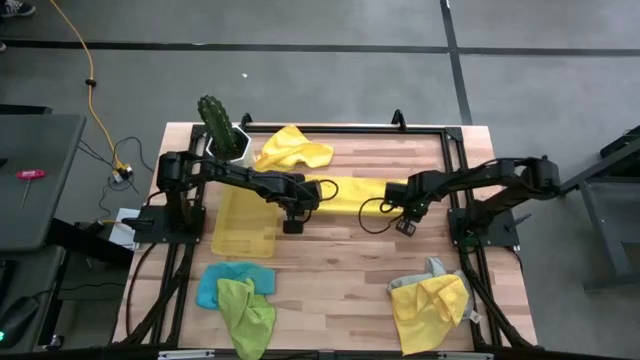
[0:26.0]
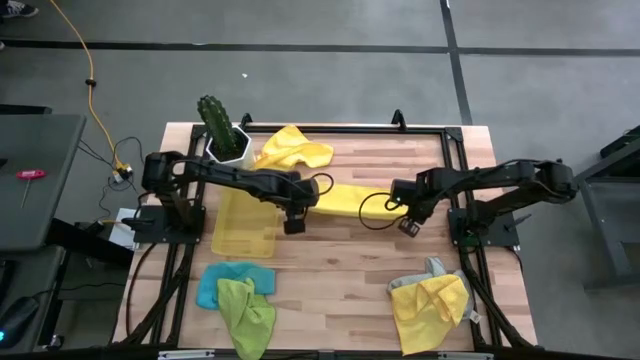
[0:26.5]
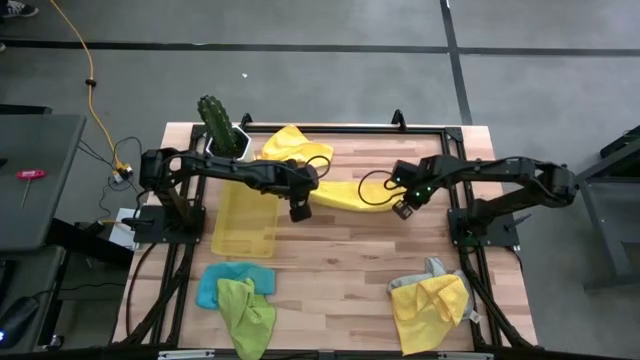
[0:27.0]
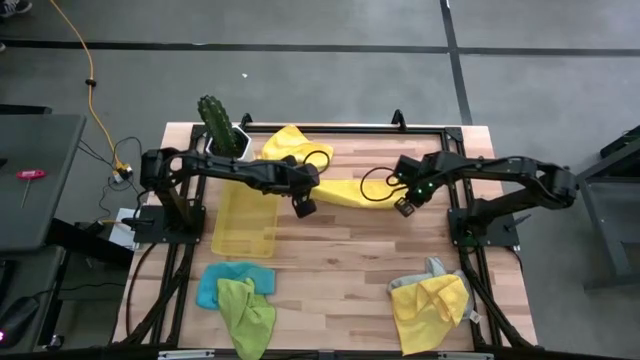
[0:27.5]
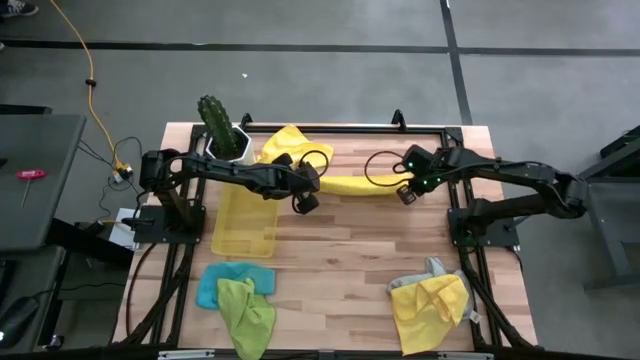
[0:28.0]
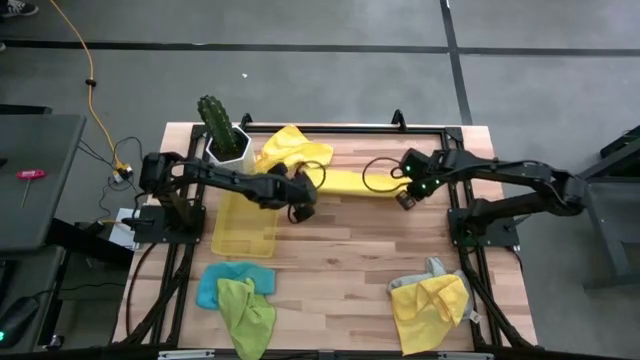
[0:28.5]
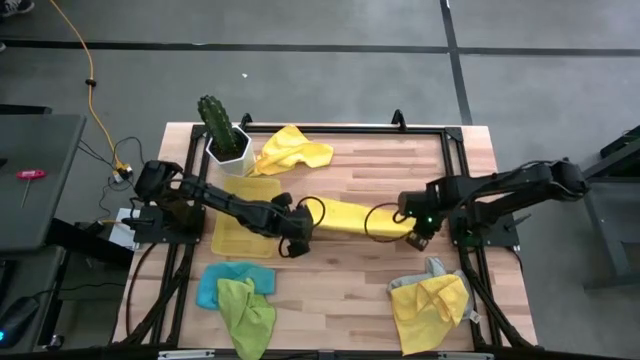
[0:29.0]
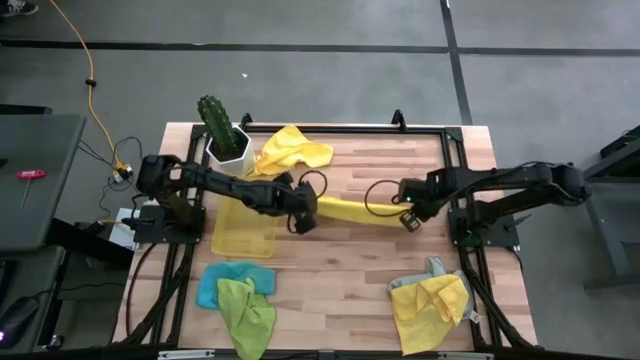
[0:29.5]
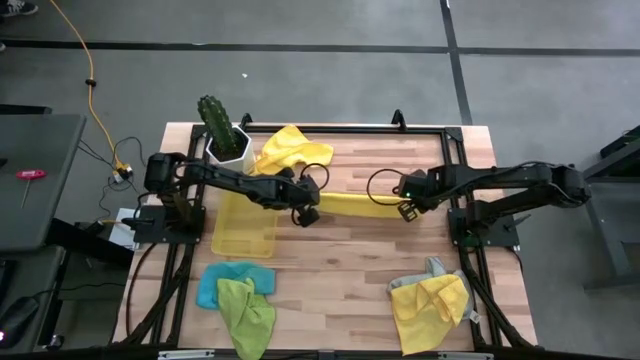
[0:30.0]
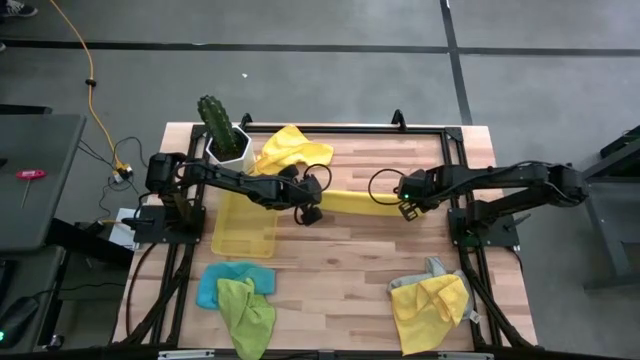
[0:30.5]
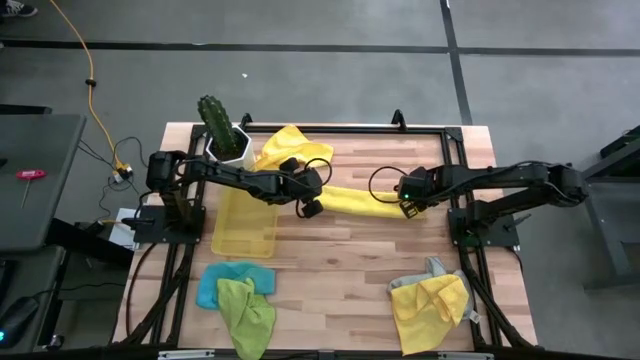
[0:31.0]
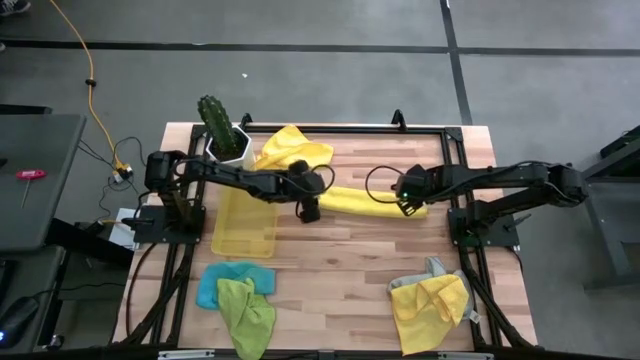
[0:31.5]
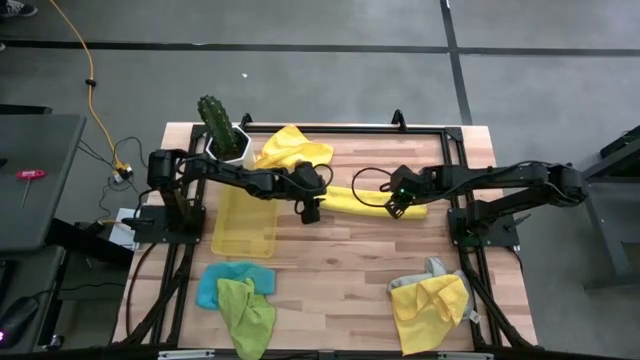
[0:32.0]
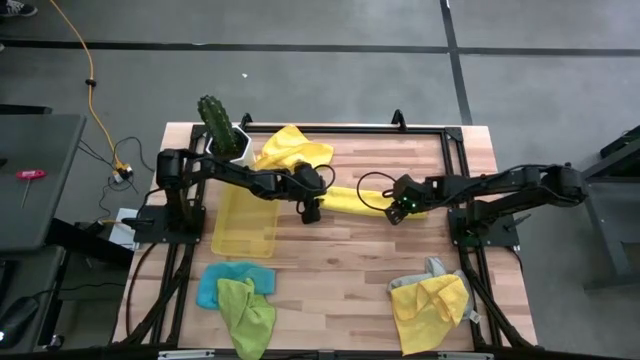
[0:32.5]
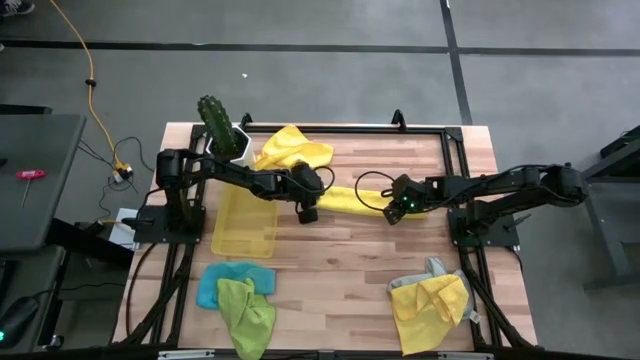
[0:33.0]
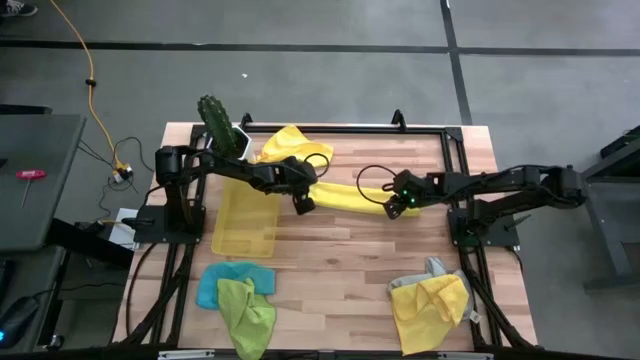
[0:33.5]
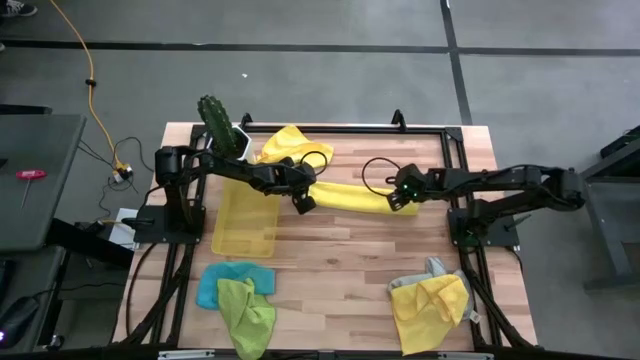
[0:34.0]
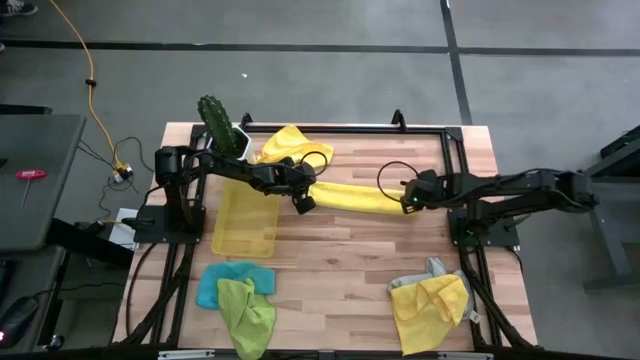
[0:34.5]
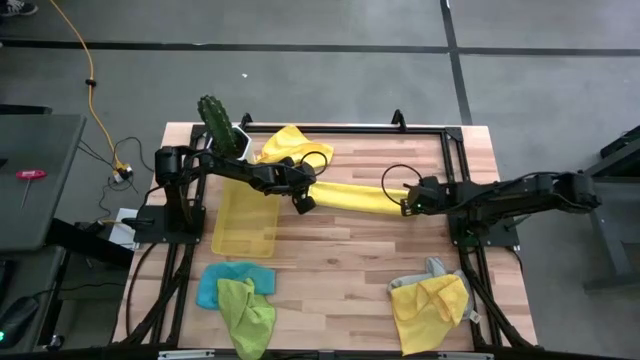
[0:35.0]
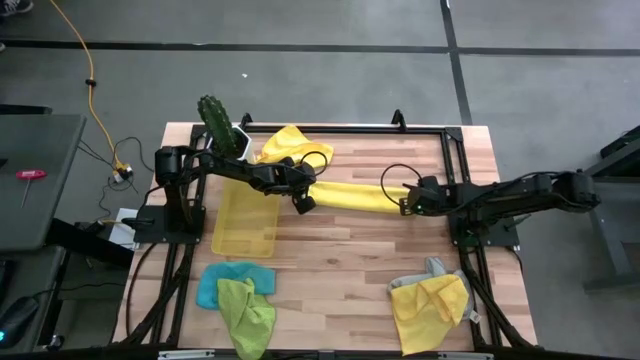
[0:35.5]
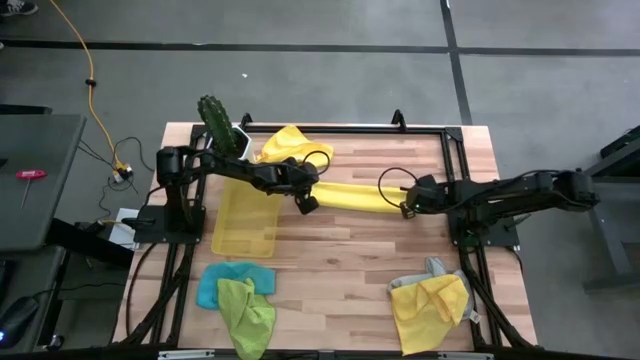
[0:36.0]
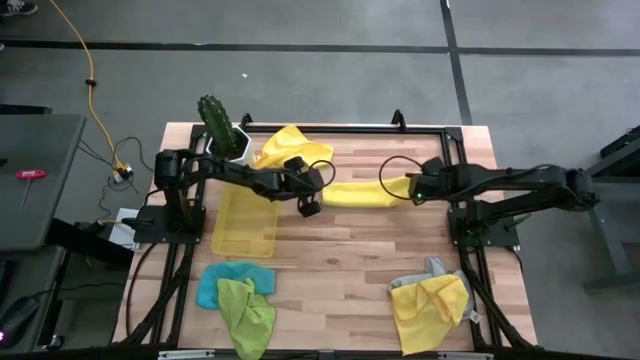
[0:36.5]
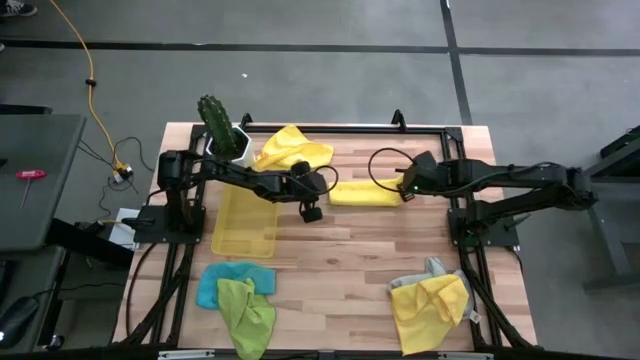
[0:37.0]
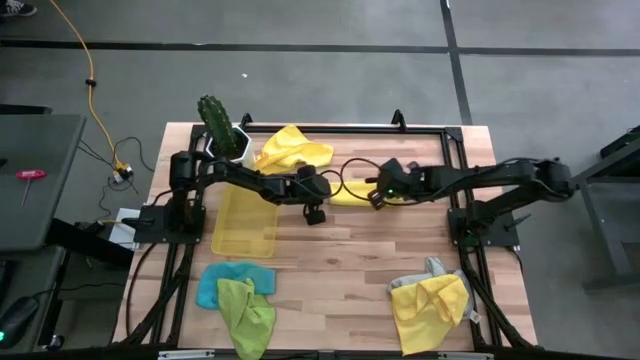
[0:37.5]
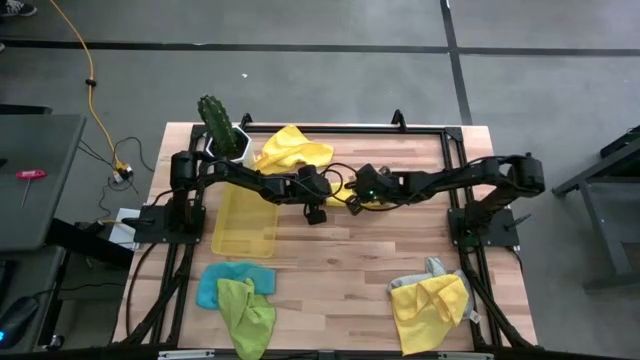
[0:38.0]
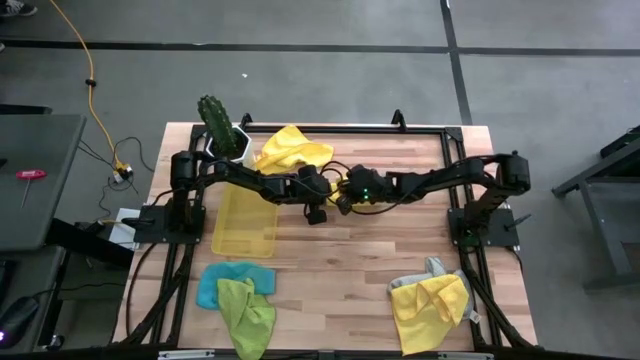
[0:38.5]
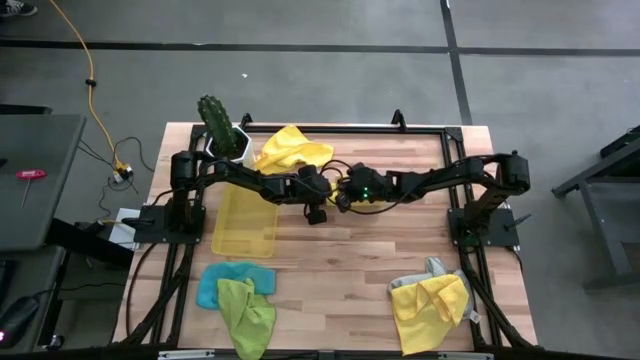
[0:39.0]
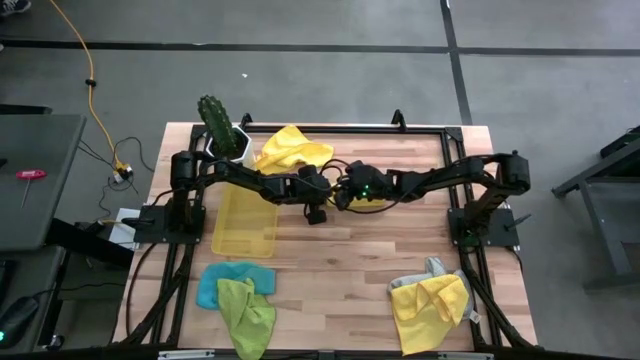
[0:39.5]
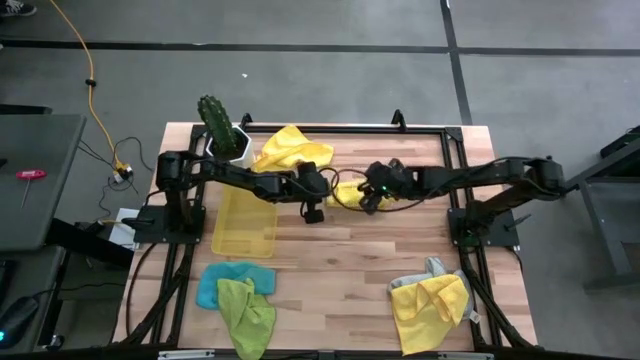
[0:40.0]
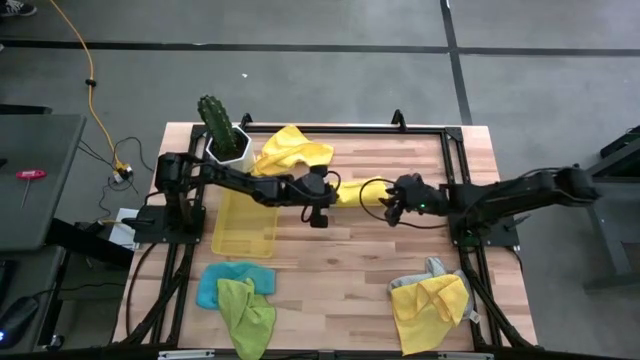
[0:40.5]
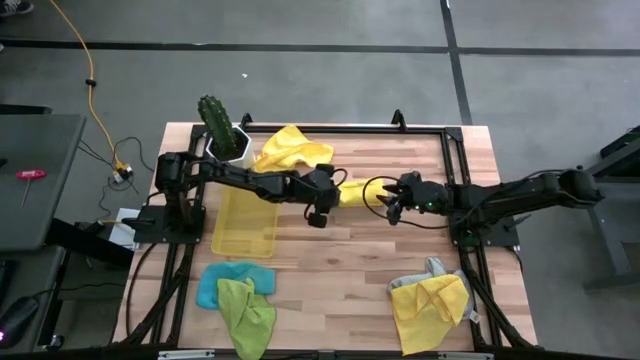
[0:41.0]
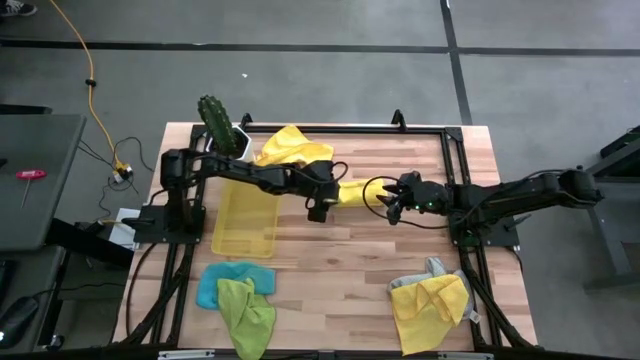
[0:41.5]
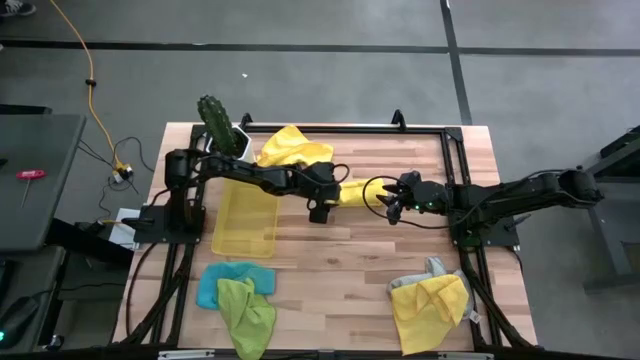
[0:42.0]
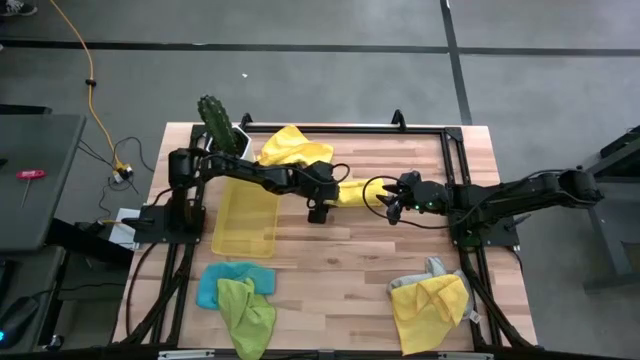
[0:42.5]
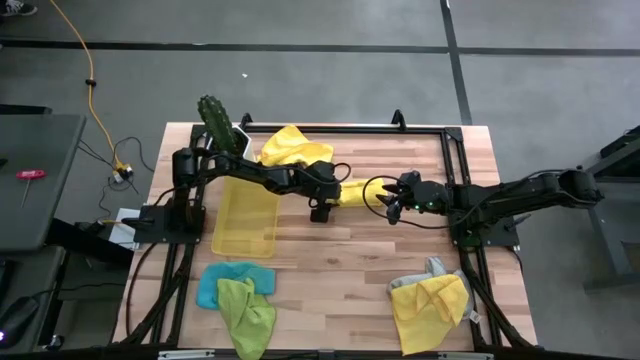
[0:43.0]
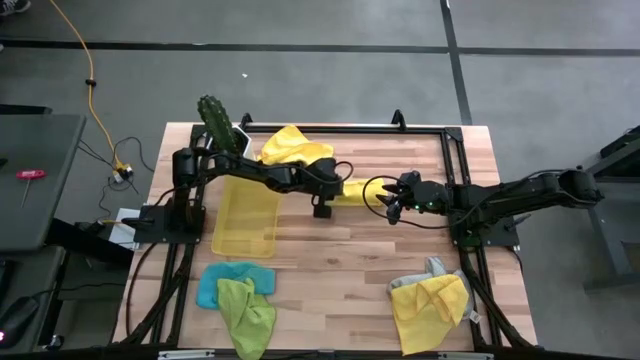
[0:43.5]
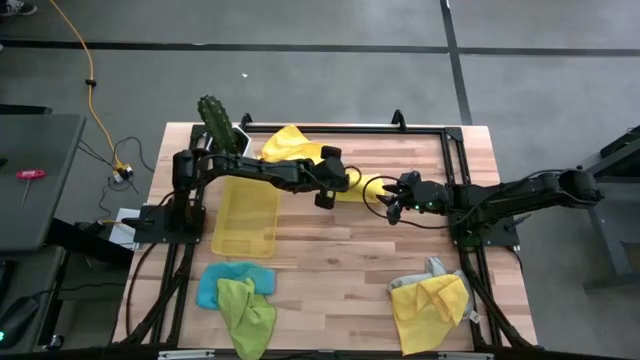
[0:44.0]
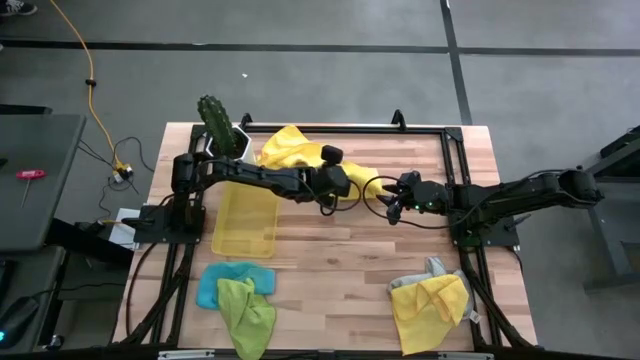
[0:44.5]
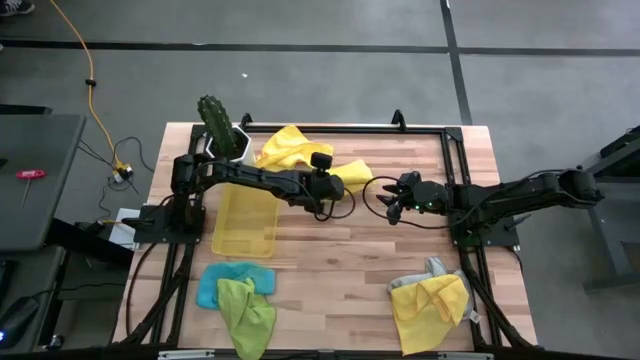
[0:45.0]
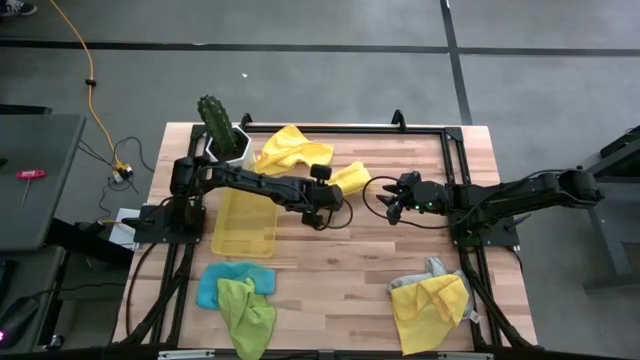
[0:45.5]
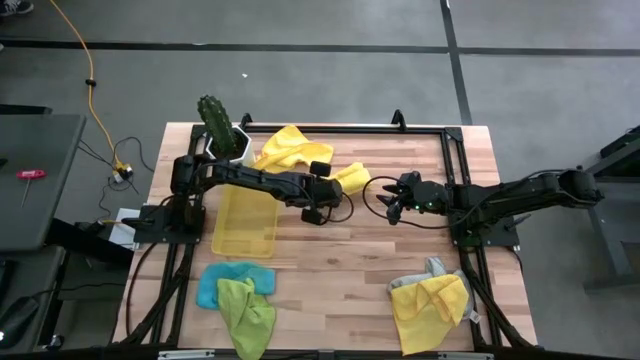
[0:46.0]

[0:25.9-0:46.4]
Task: Fold microfiber towels
Fold the top right yellow microfiber towel

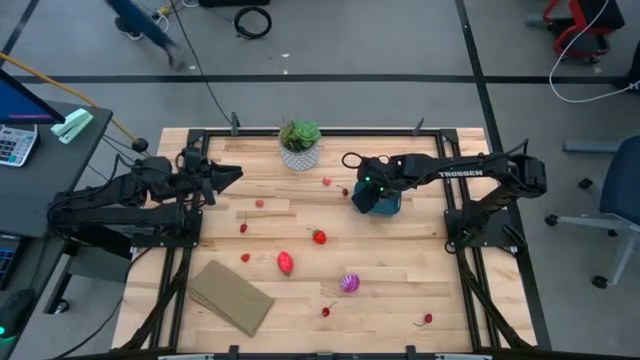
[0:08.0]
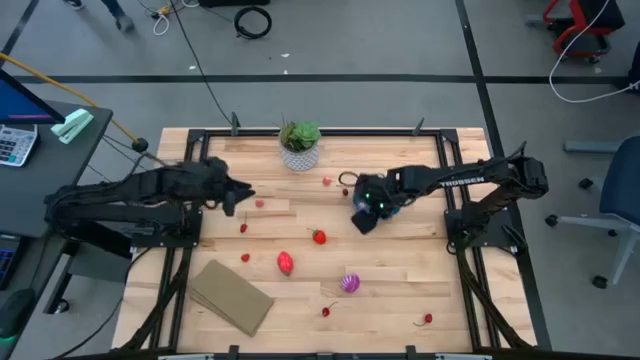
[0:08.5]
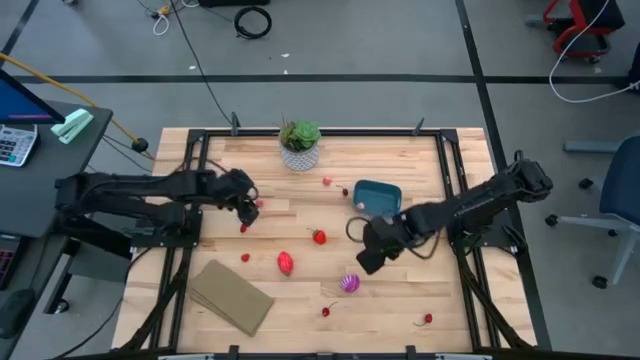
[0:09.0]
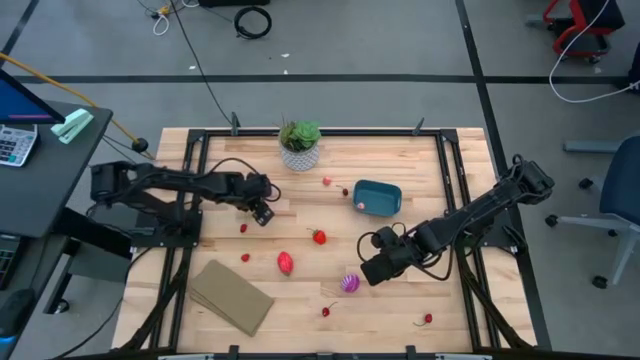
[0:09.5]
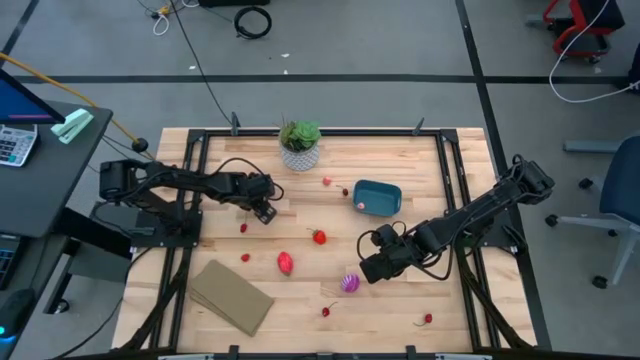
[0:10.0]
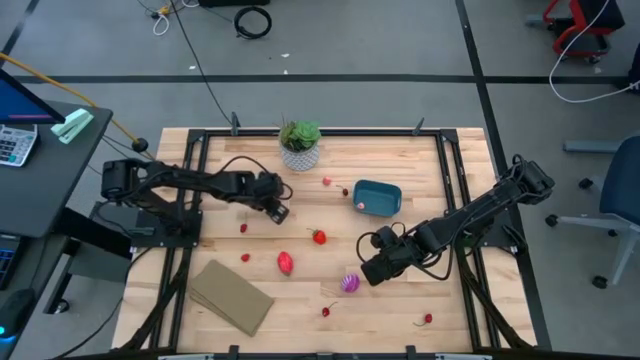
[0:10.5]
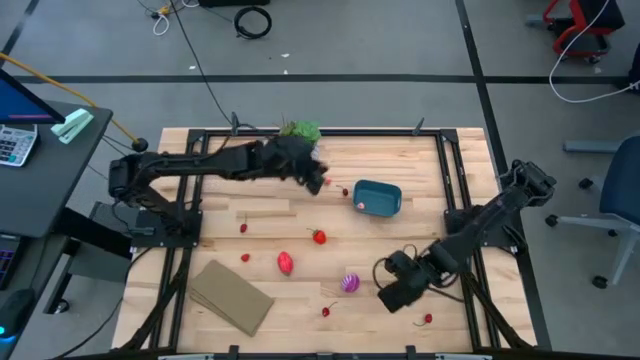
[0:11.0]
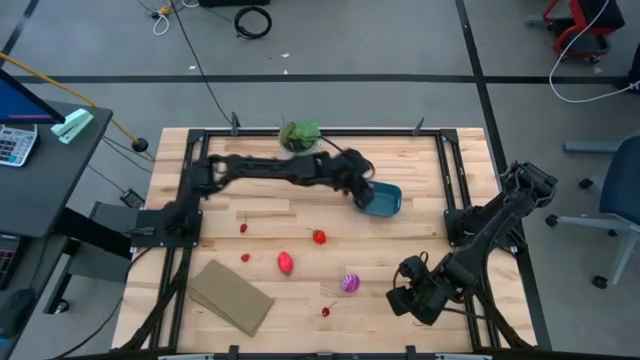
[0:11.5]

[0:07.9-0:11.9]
Task: Pick and placing Produce into tupperware
Put the right pink peach into the blue bin
